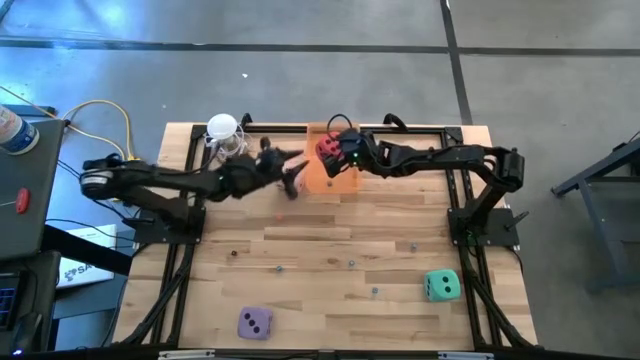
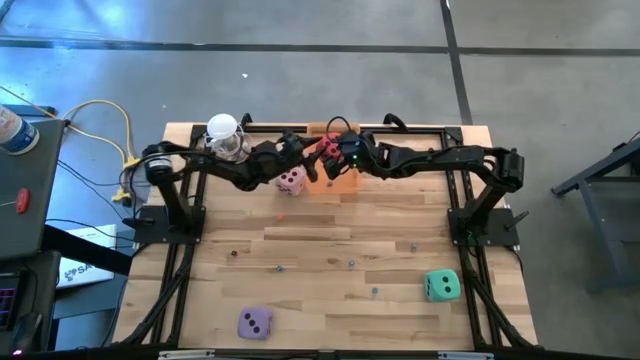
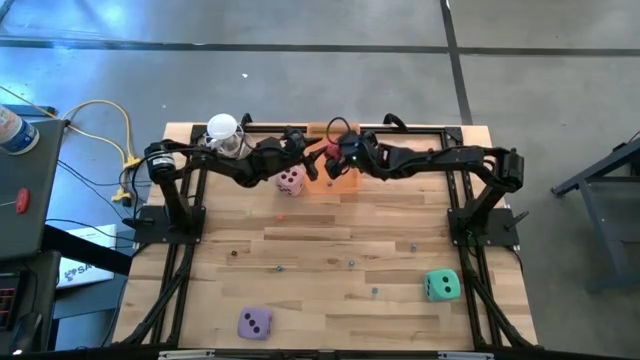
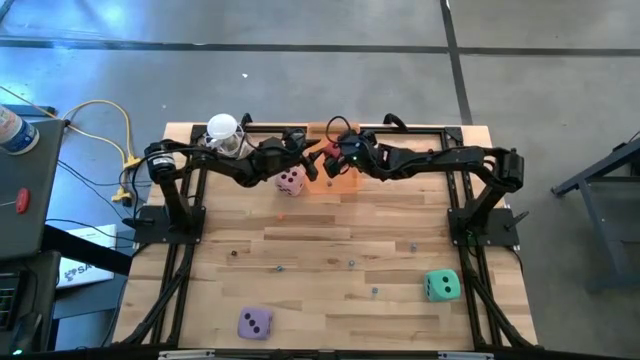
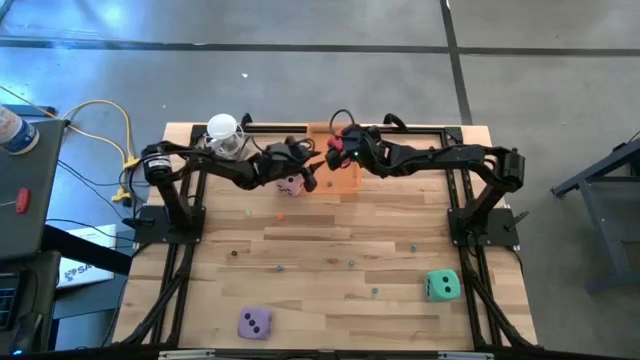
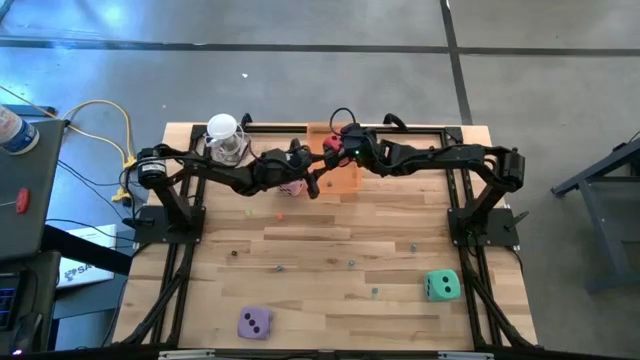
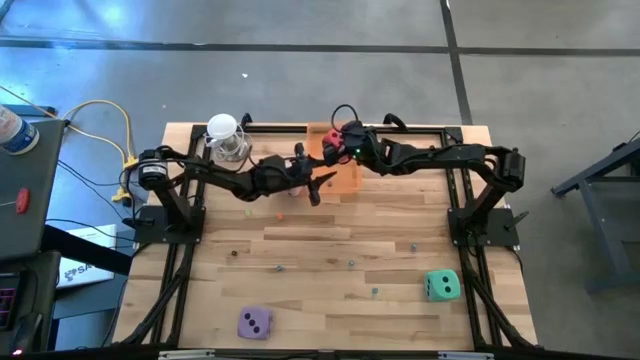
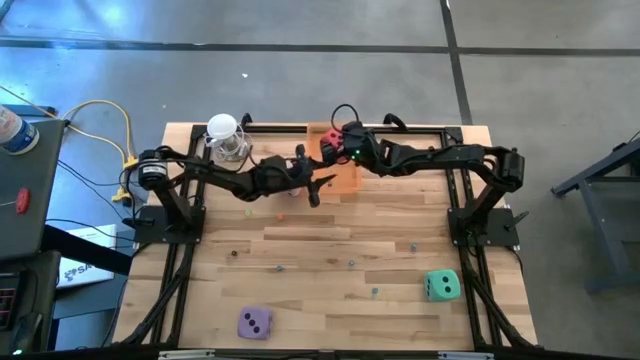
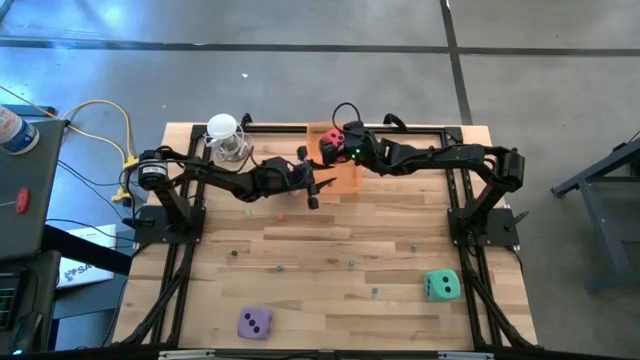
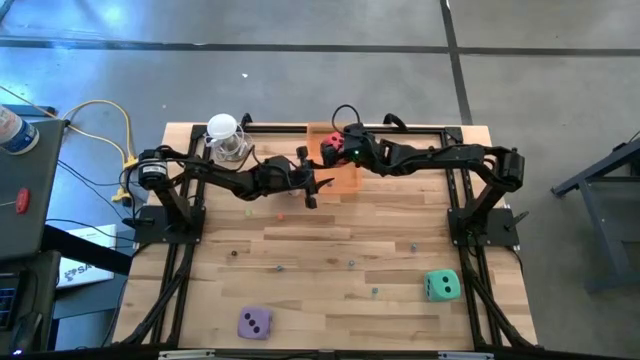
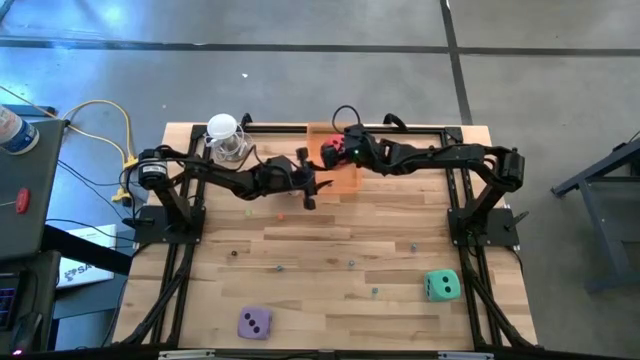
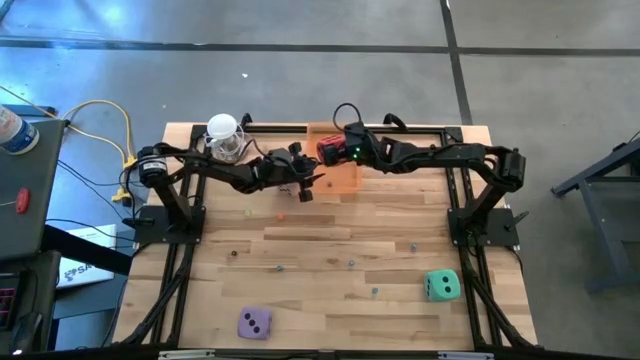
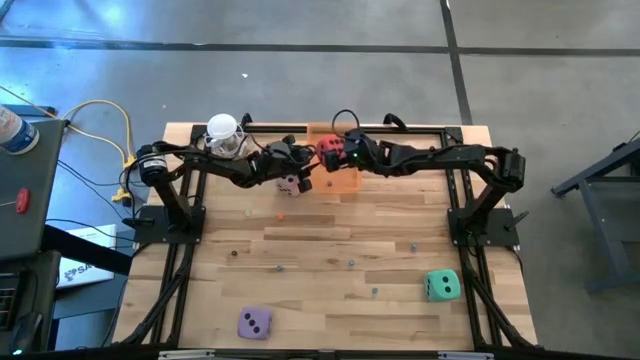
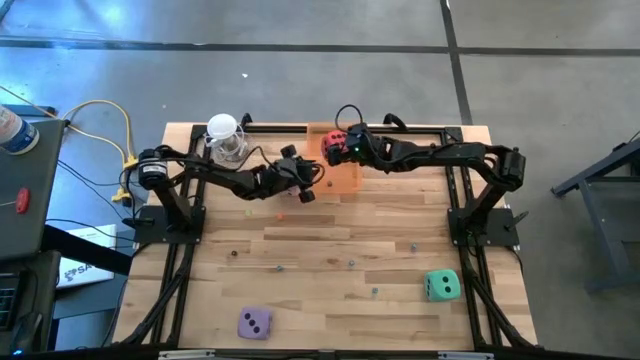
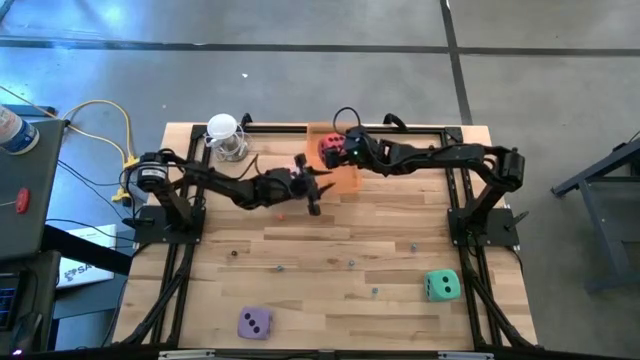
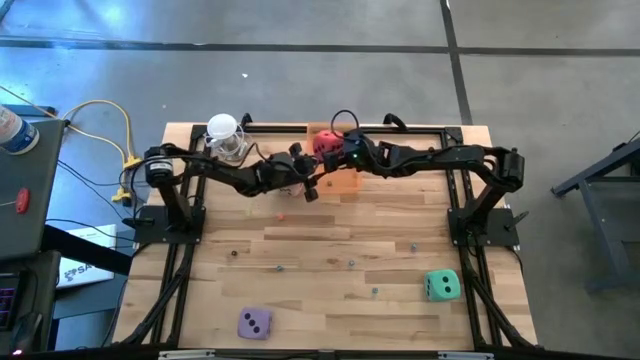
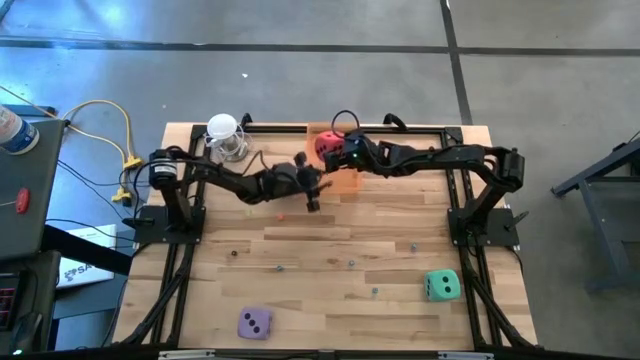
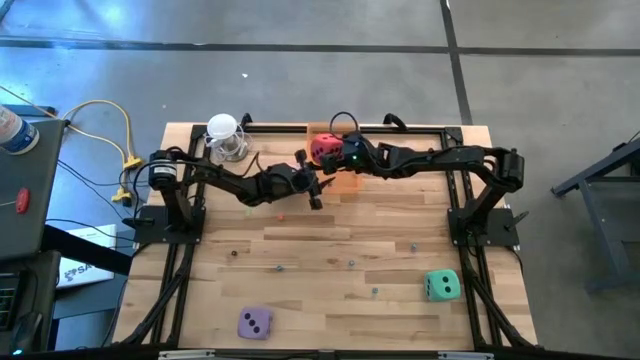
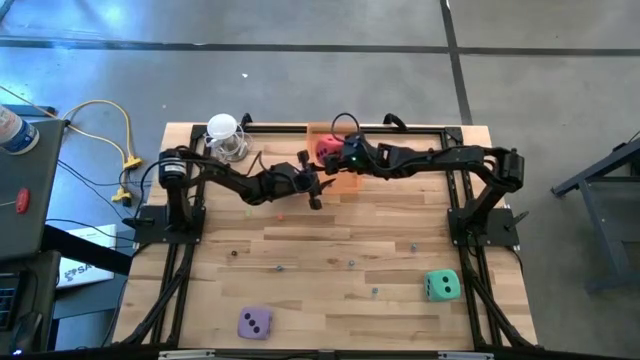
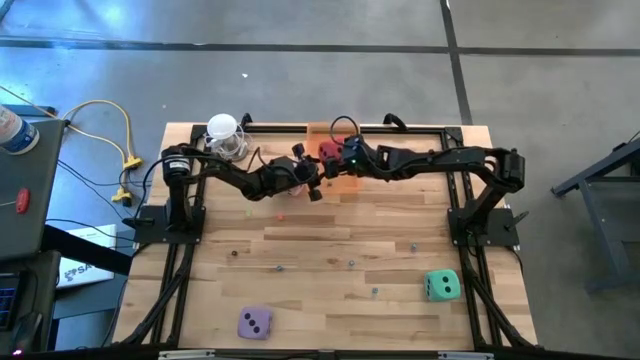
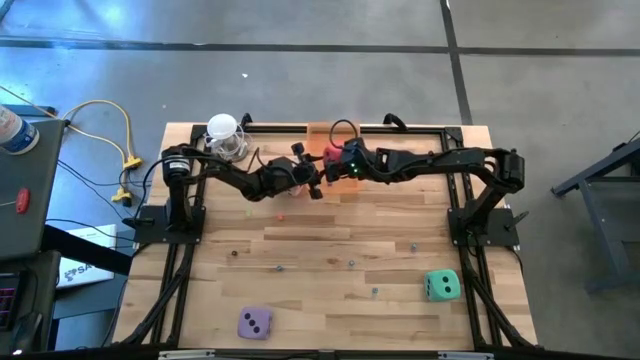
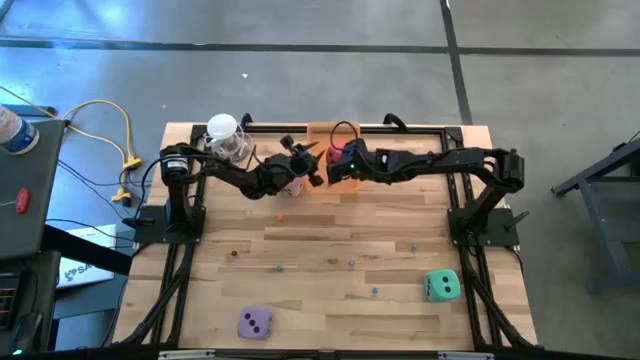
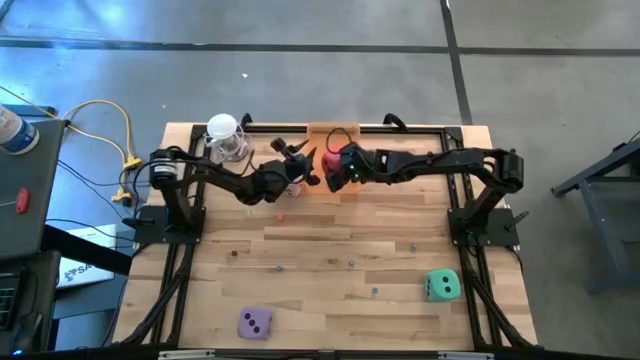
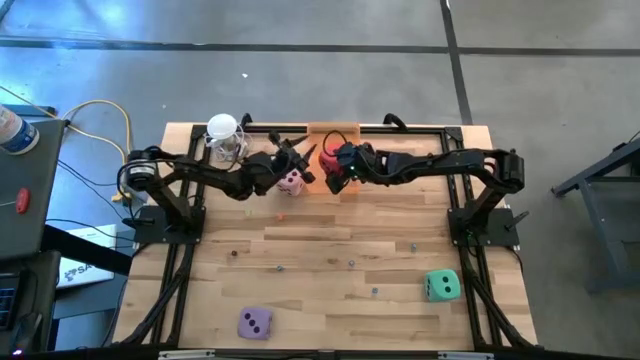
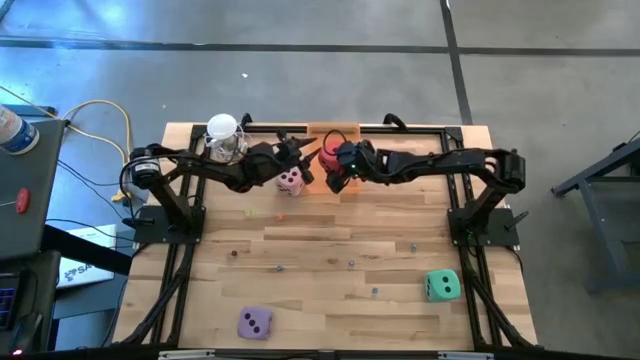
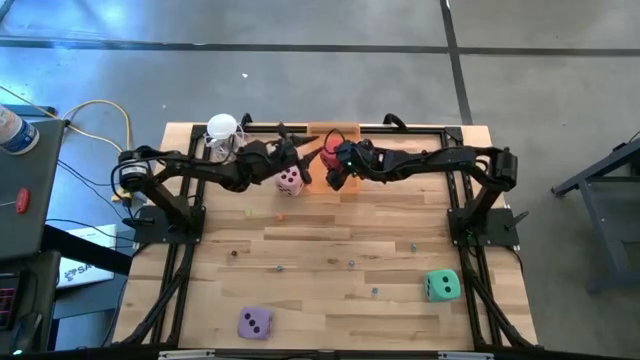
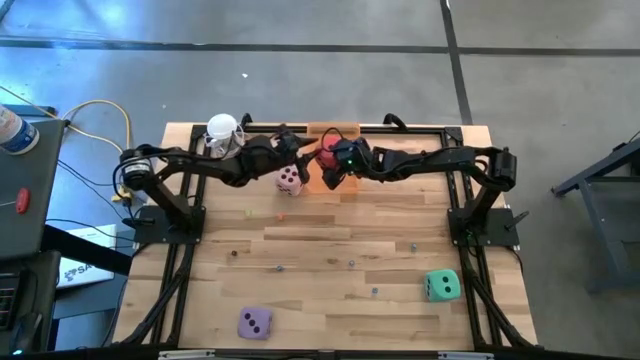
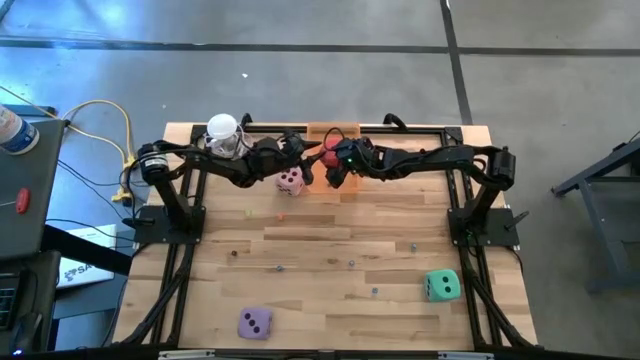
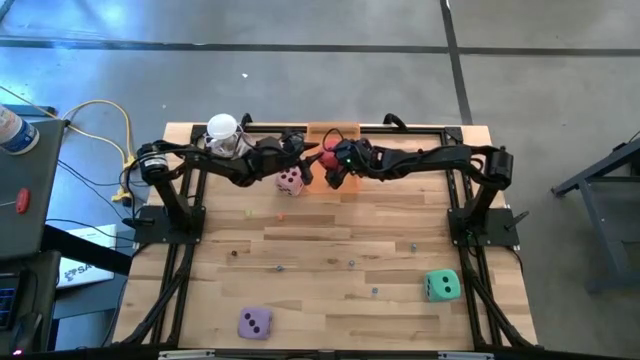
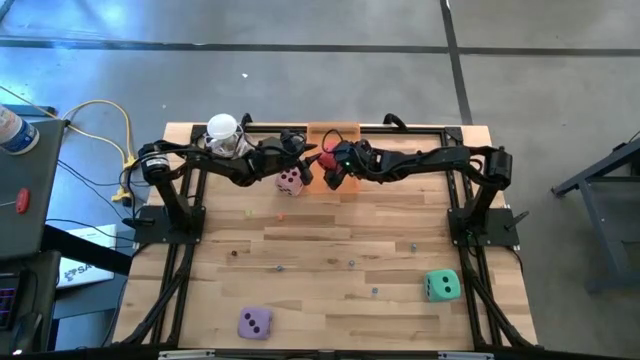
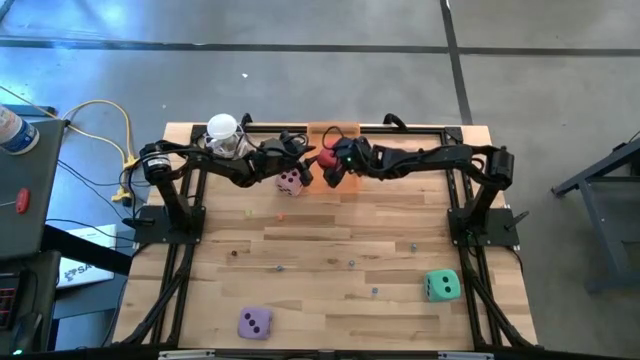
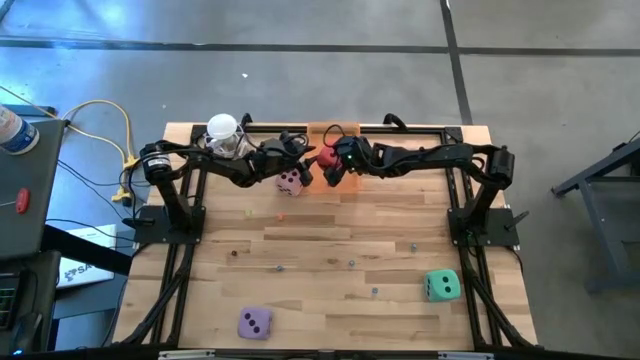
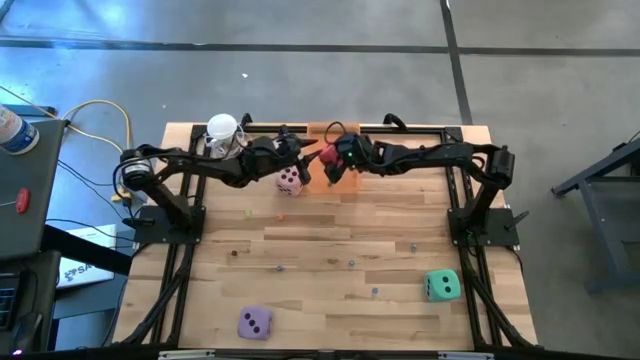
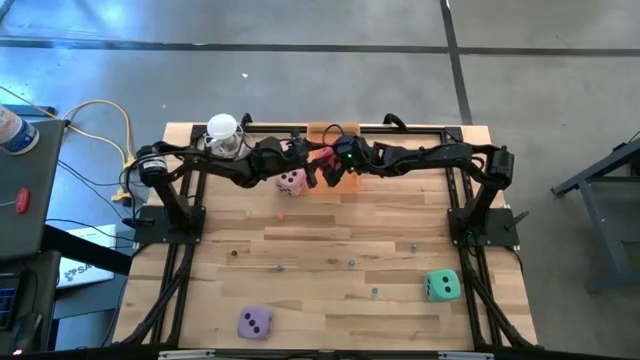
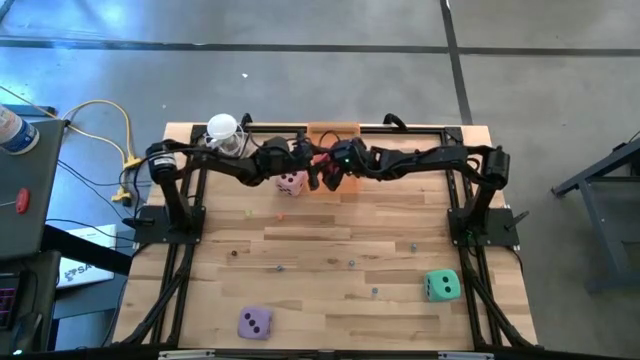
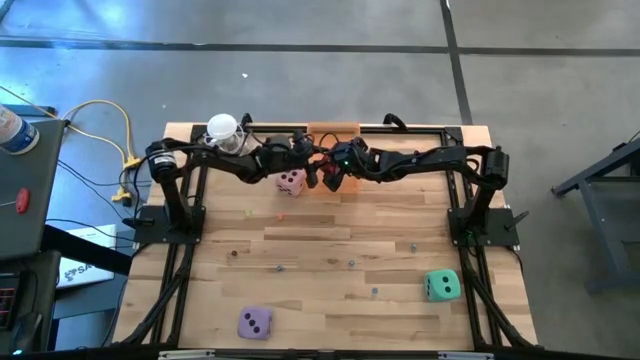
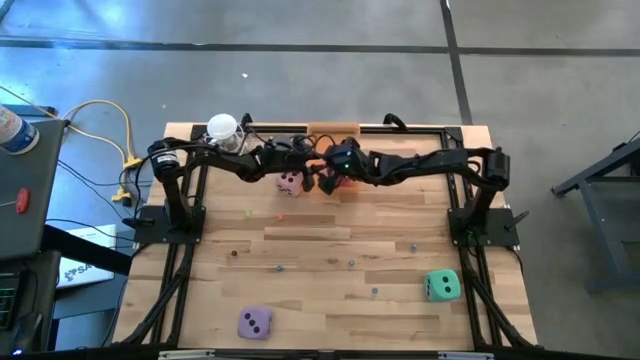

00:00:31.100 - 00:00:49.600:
Task: Pick & Place Dice
Put the red die into the orange bin

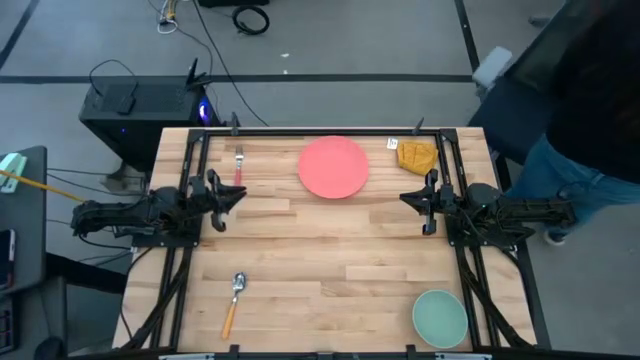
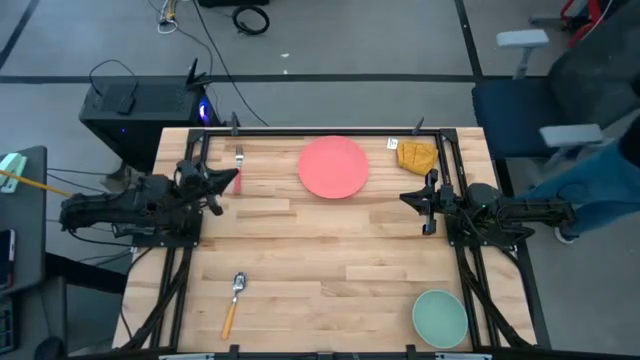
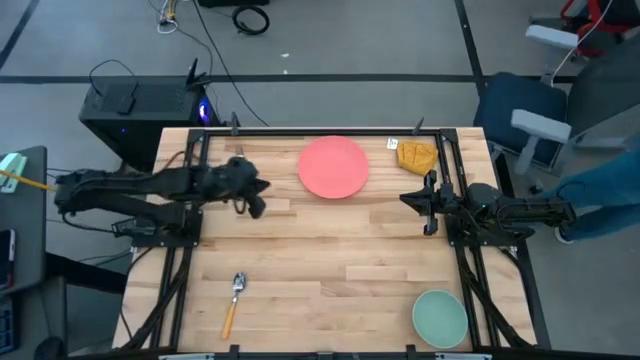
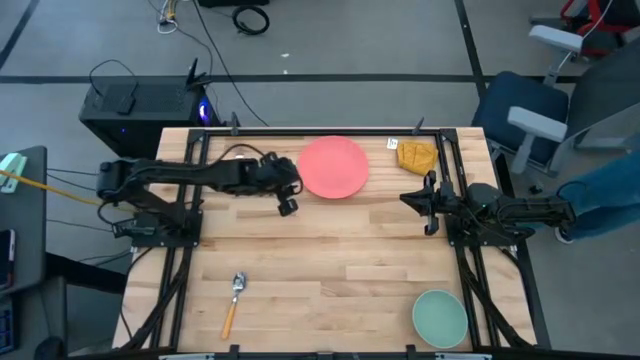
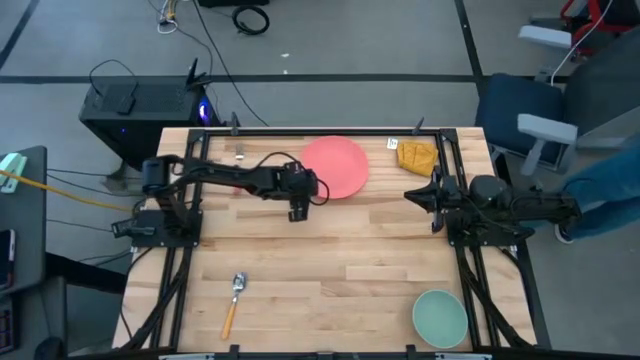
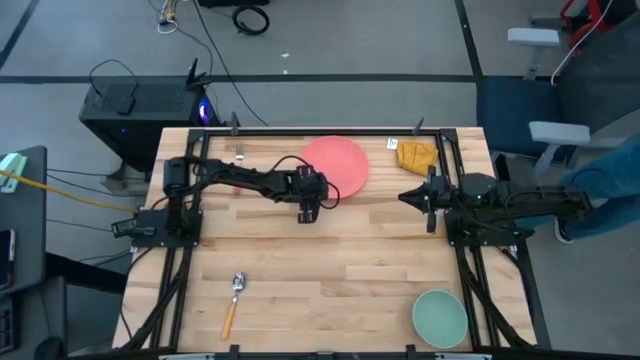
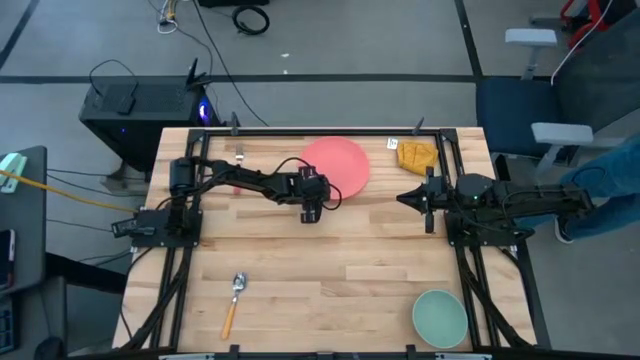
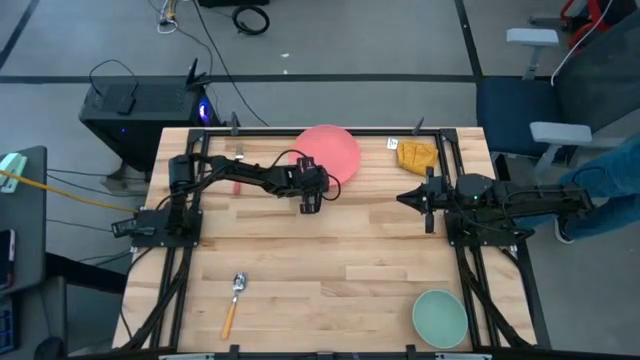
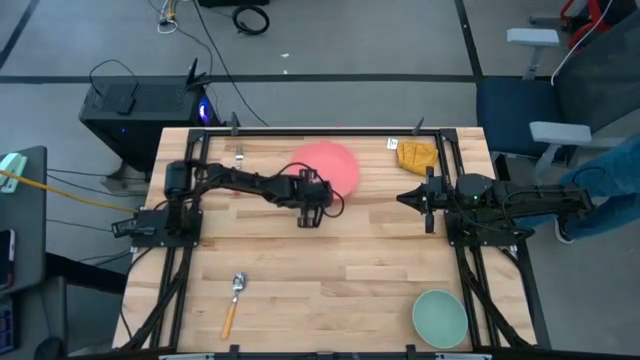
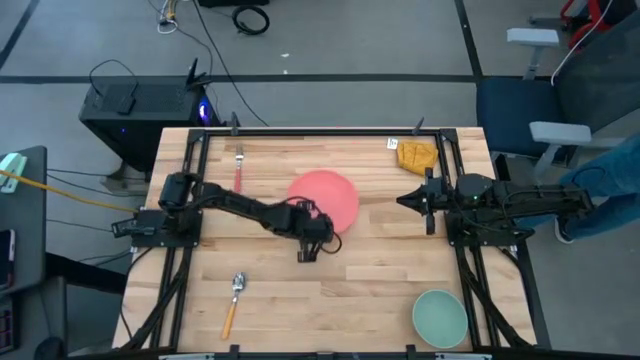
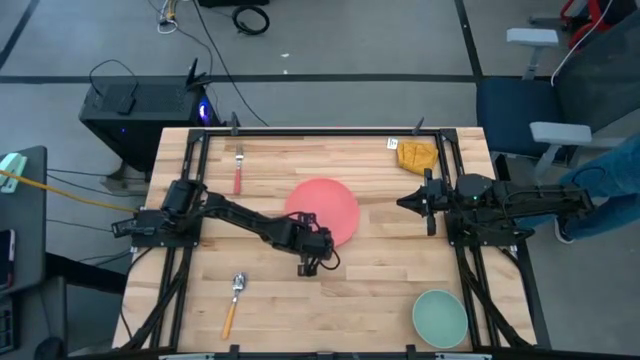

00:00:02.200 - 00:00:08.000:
Task: Set table place
Move the pink plate to the center of the table
